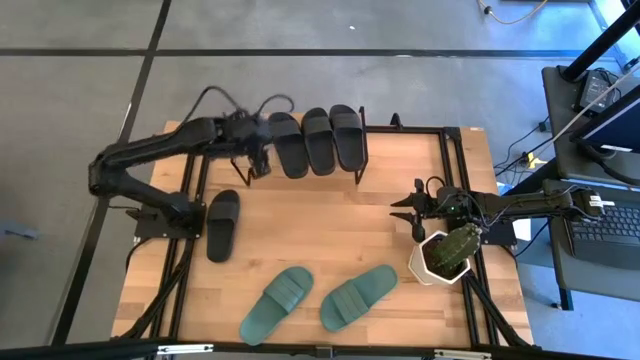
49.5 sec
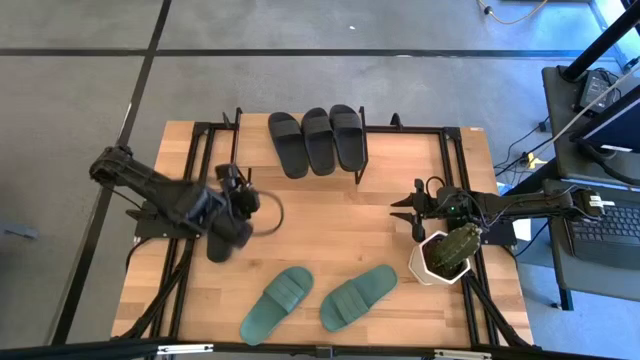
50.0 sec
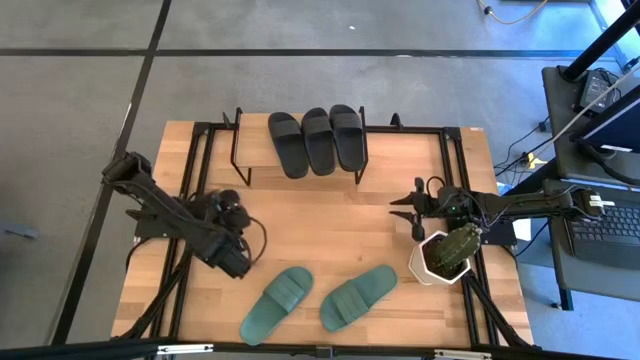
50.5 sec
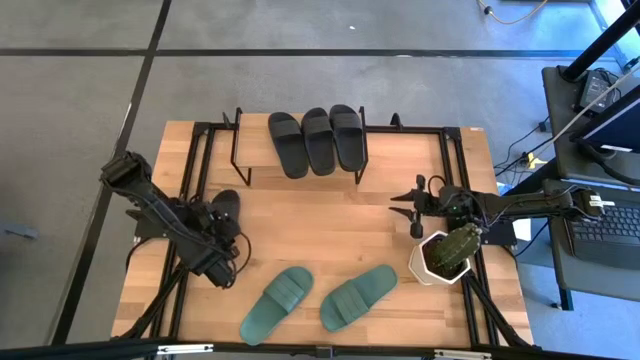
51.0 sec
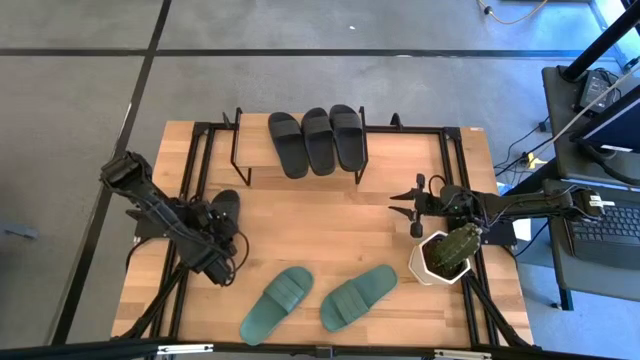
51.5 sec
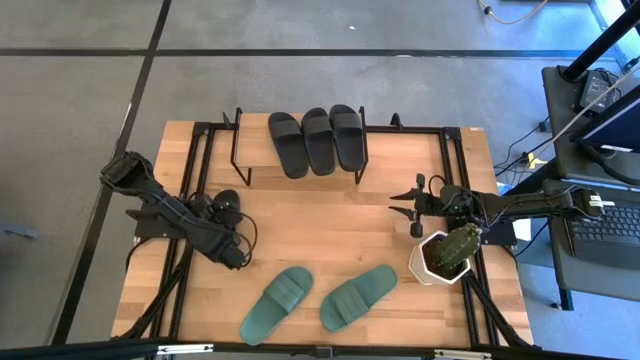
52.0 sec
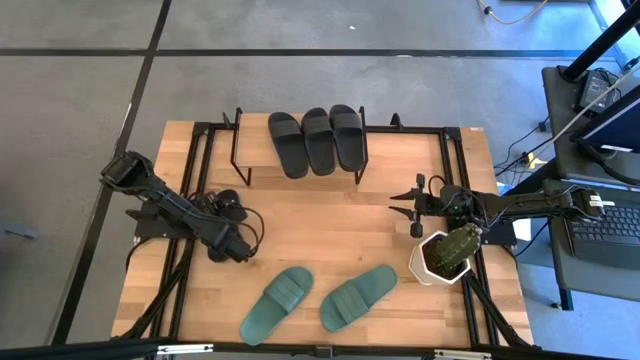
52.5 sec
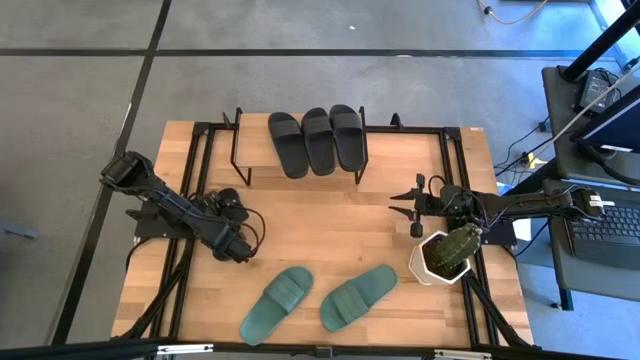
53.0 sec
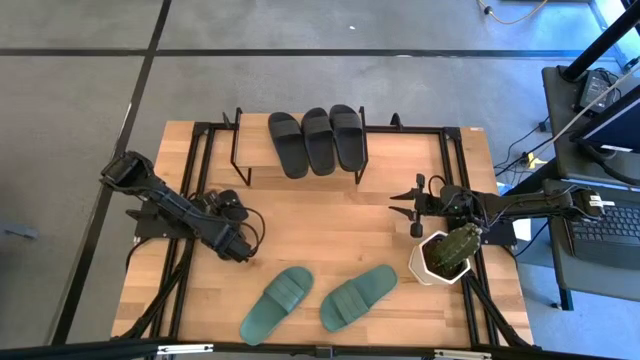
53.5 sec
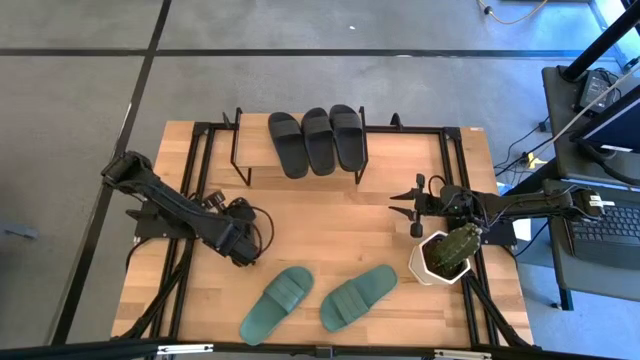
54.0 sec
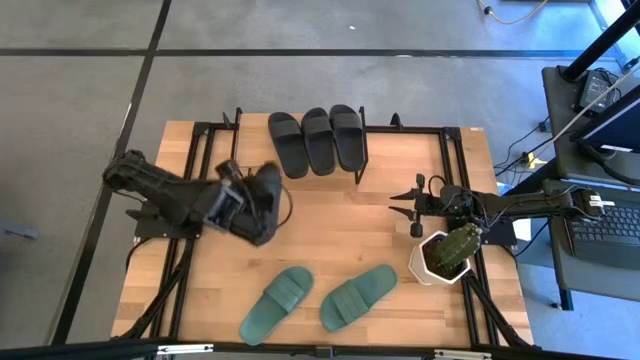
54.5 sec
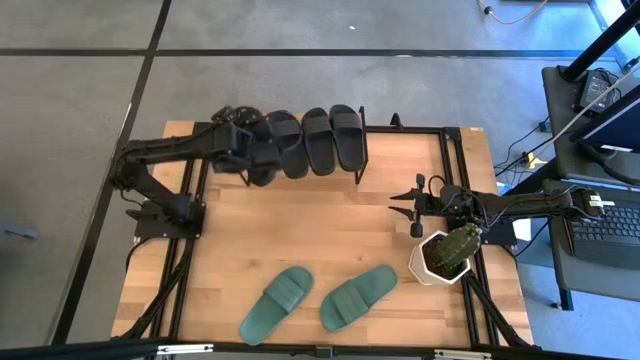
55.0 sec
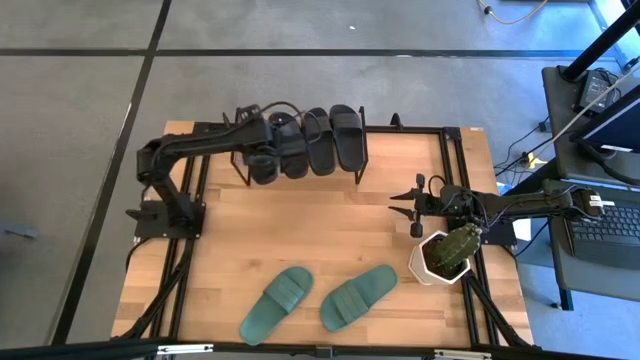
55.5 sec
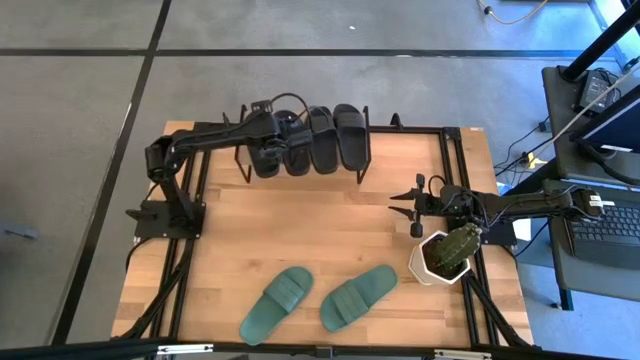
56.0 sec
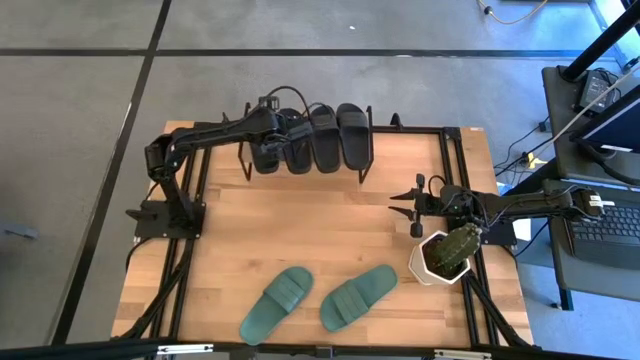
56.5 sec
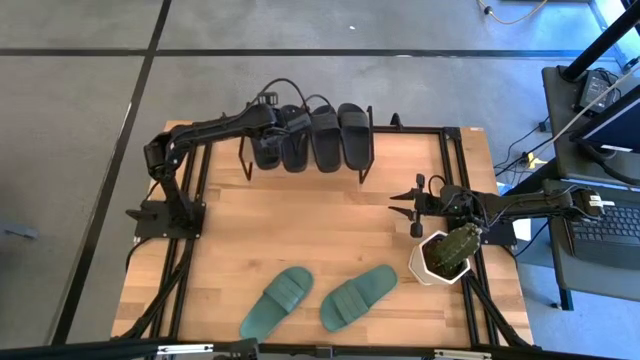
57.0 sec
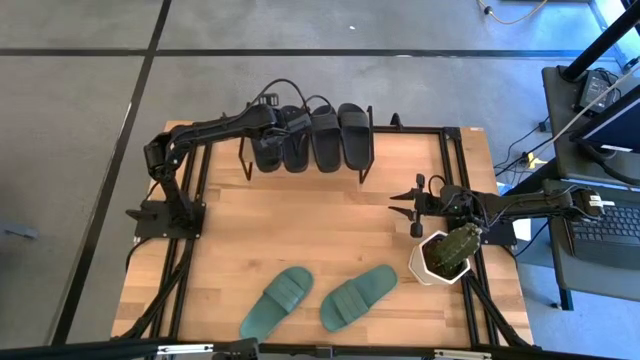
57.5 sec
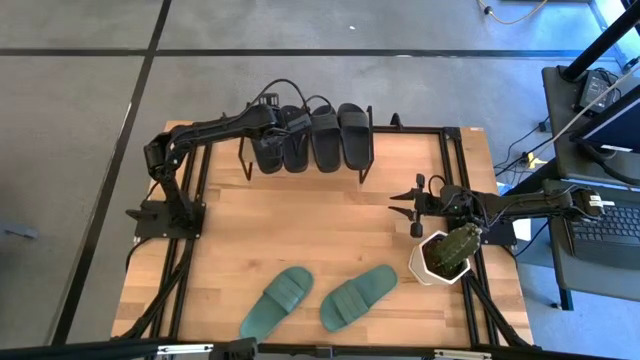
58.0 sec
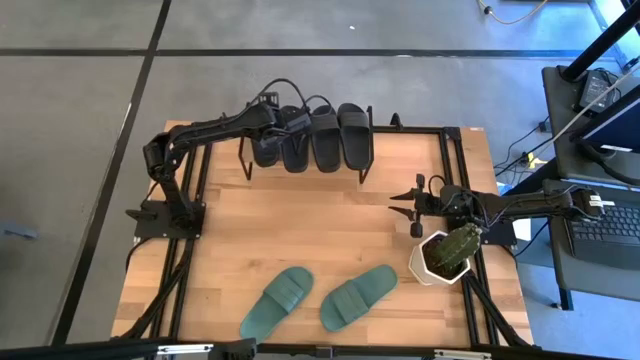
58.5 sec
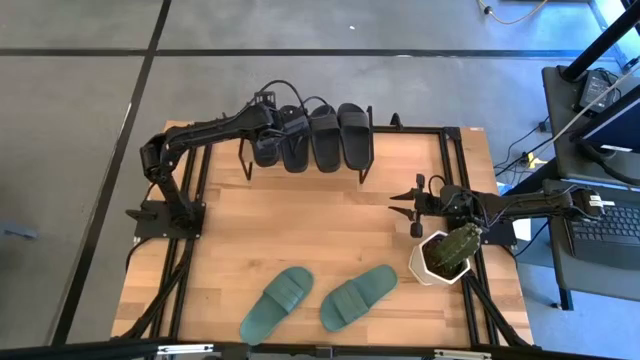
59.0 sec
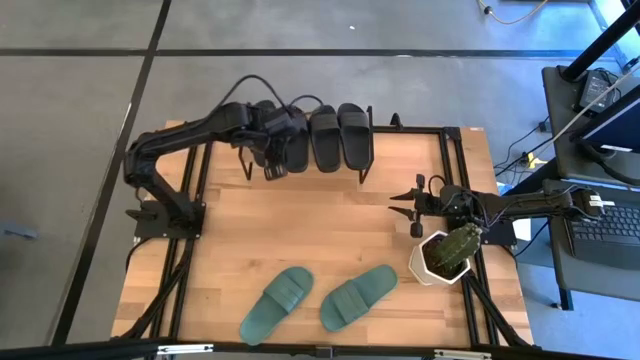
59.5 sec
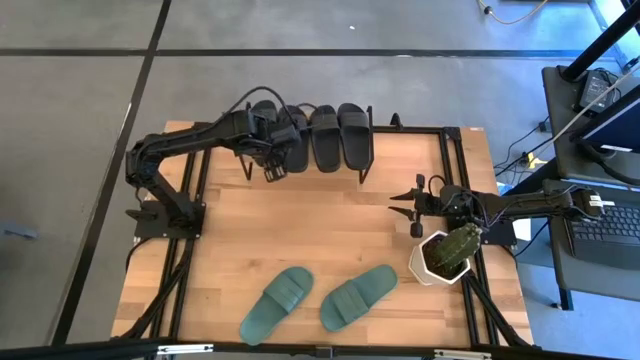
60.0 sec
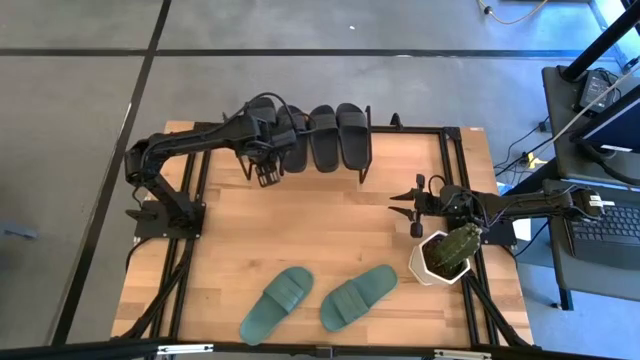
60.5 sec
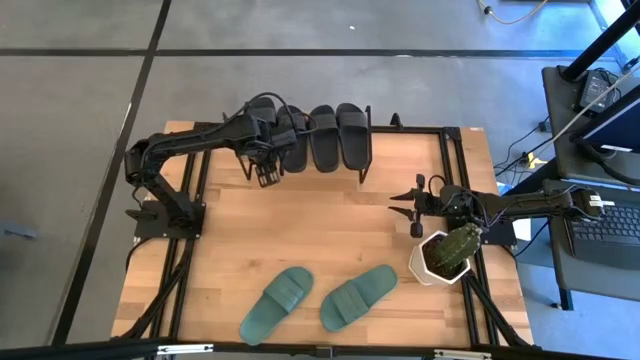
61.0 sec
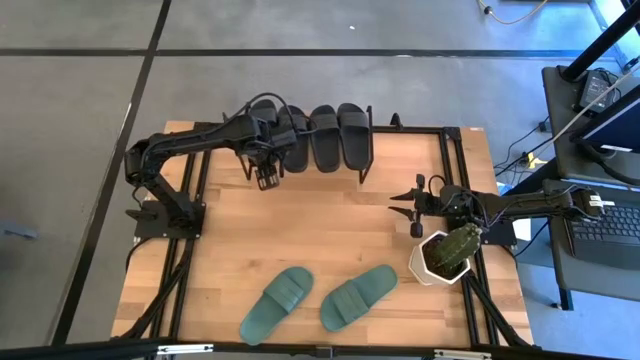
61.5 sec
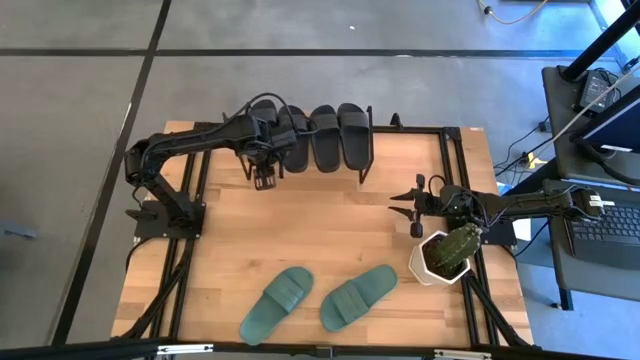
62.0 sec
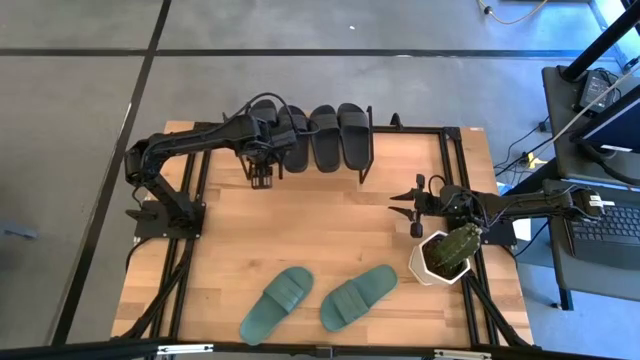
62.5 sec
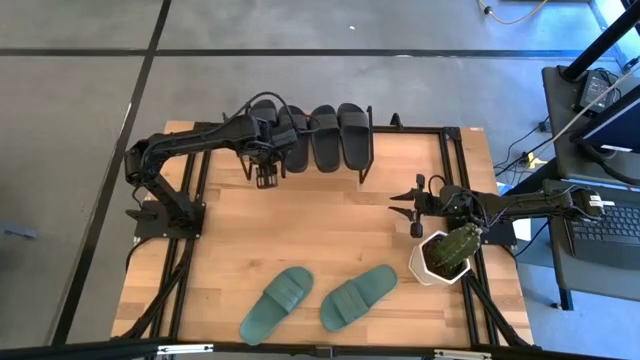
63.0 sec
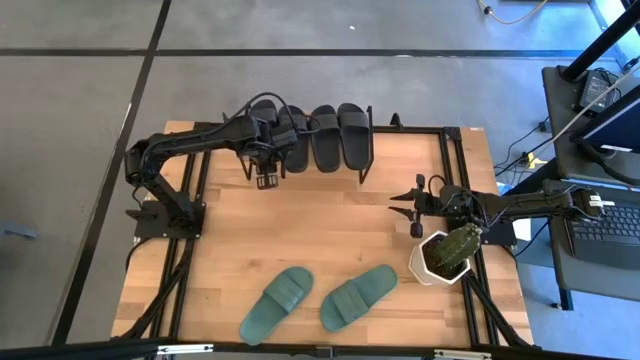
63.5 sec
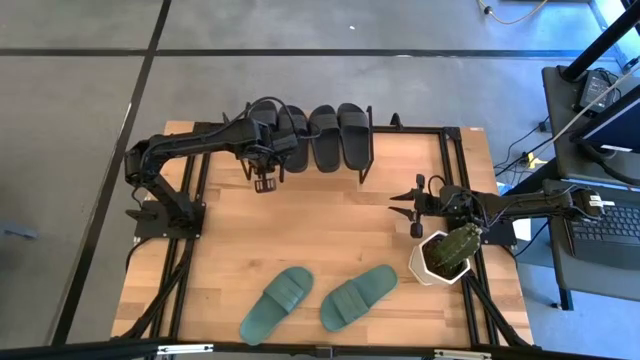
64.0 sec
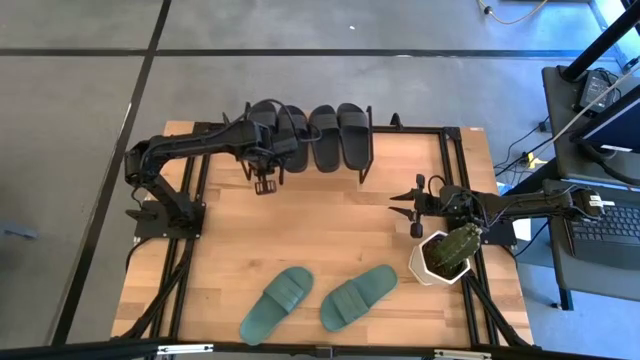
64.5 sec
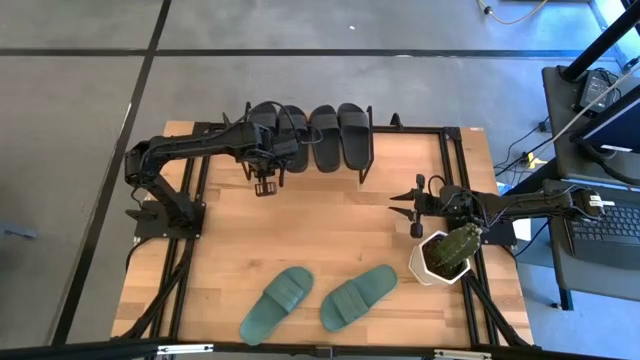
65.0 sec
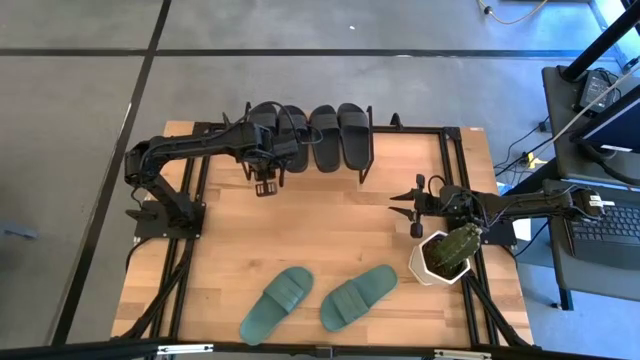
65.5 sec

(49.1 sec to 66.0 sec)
Task: Pick and place slides into the shelf
Put the black slide on the shelf
